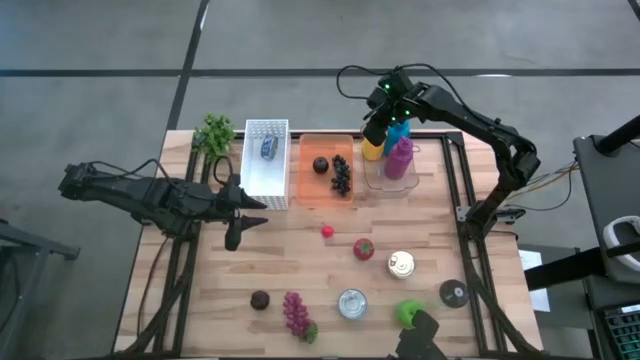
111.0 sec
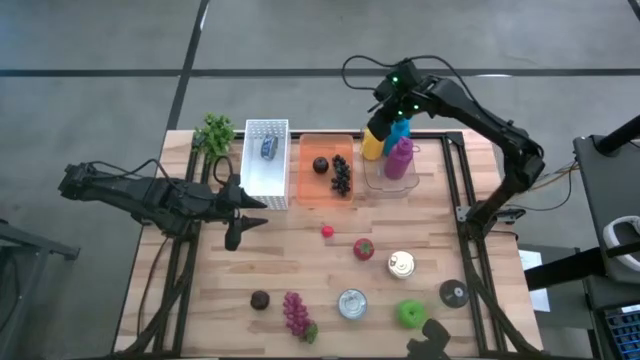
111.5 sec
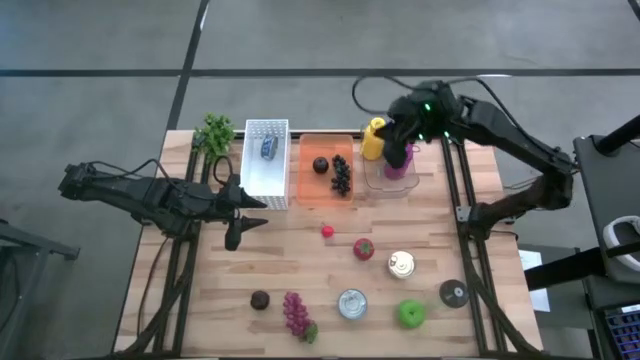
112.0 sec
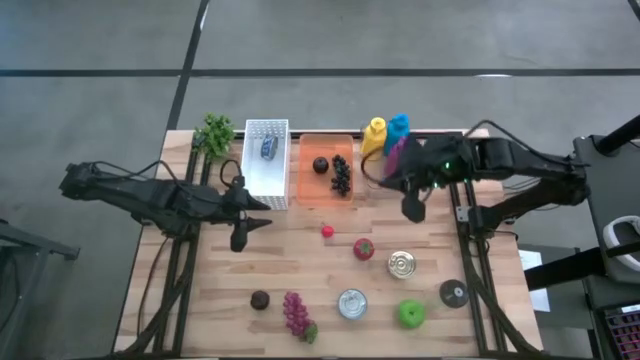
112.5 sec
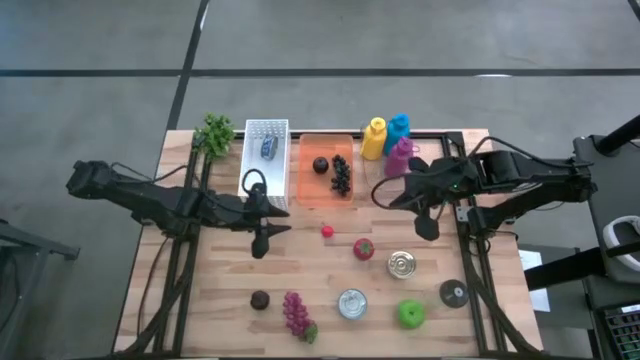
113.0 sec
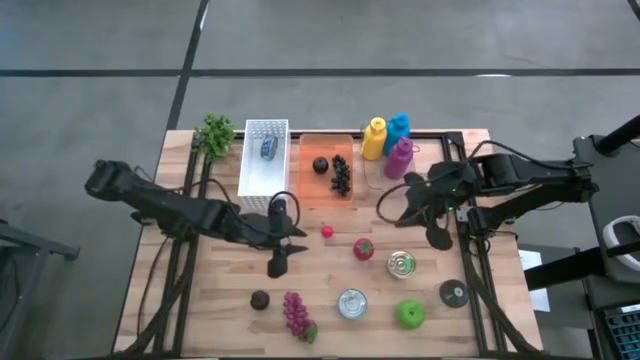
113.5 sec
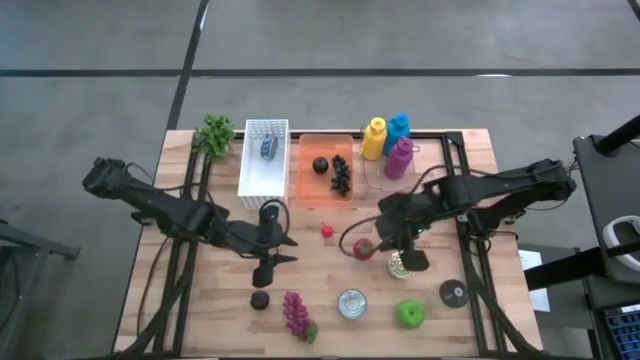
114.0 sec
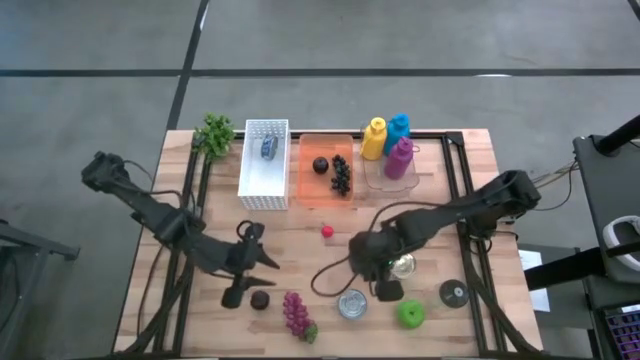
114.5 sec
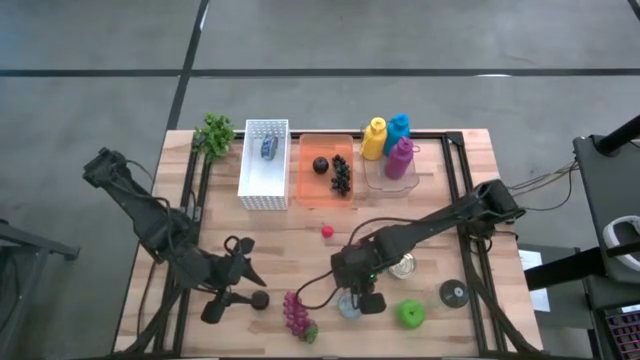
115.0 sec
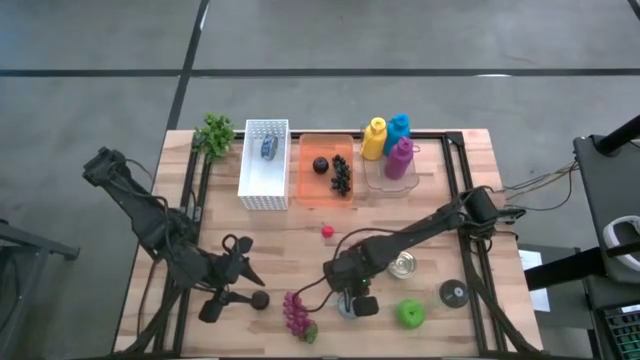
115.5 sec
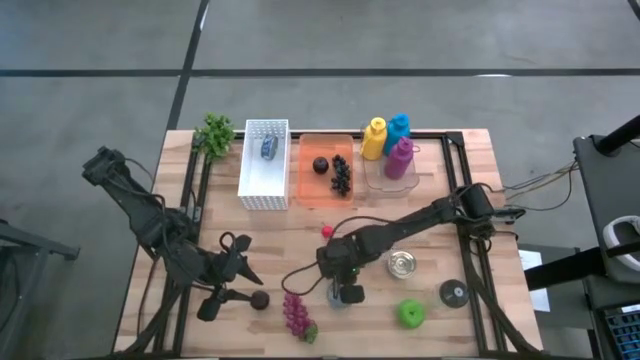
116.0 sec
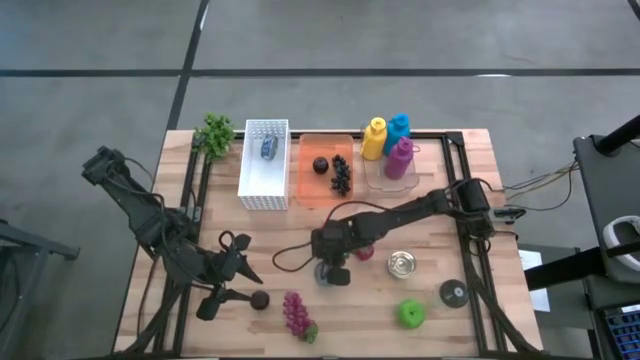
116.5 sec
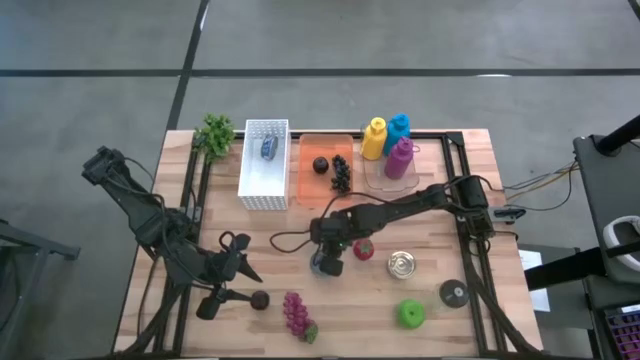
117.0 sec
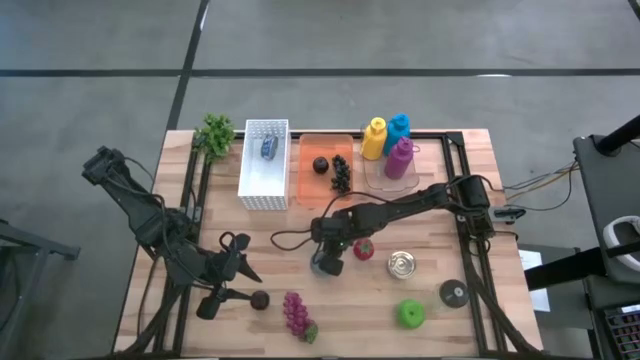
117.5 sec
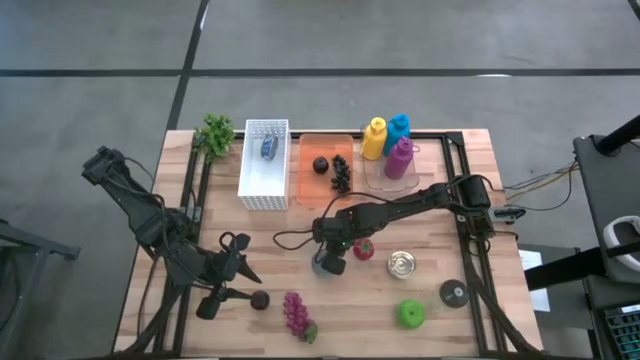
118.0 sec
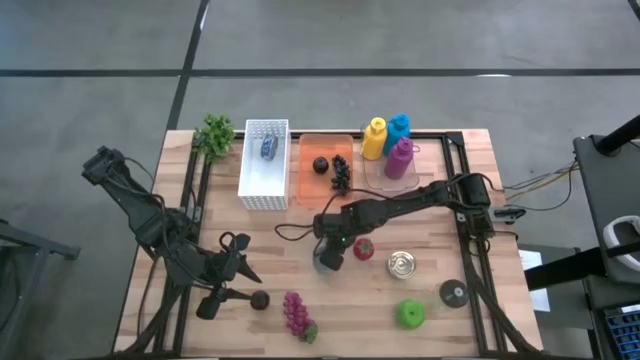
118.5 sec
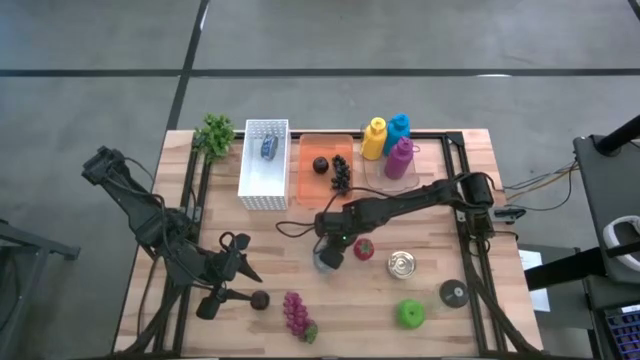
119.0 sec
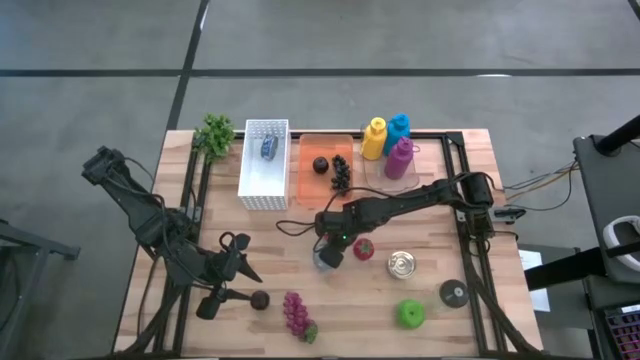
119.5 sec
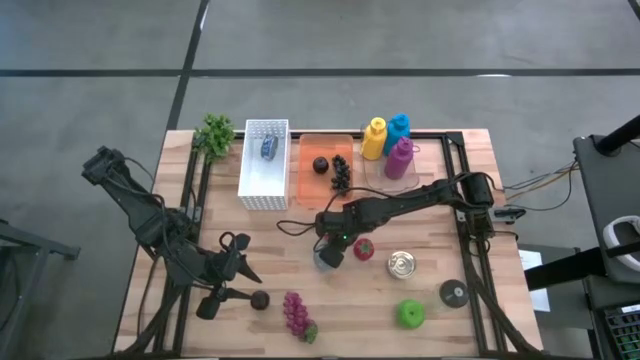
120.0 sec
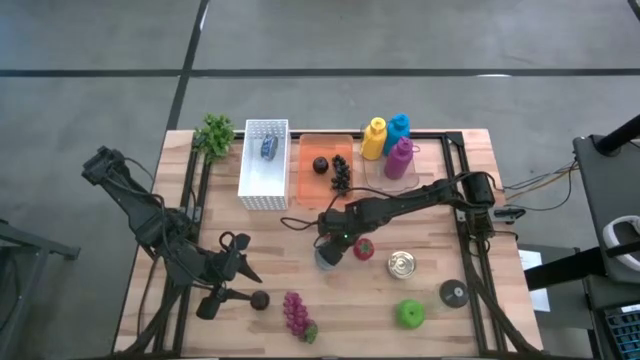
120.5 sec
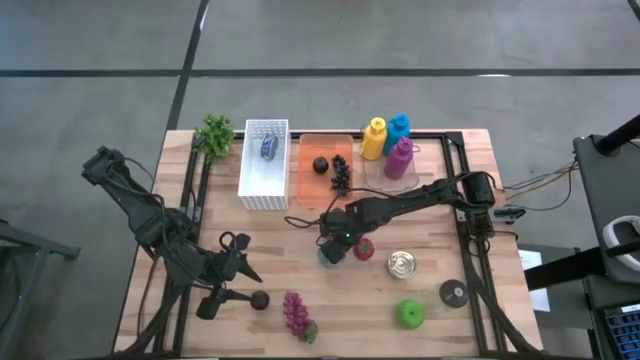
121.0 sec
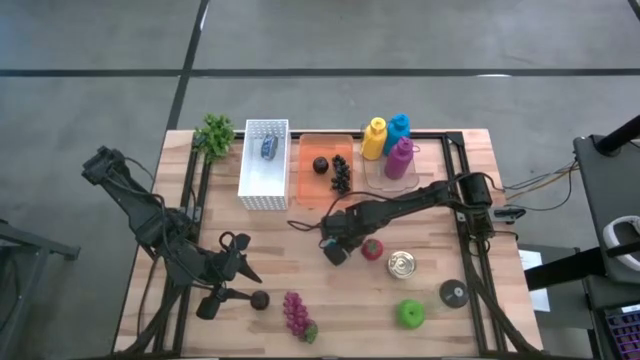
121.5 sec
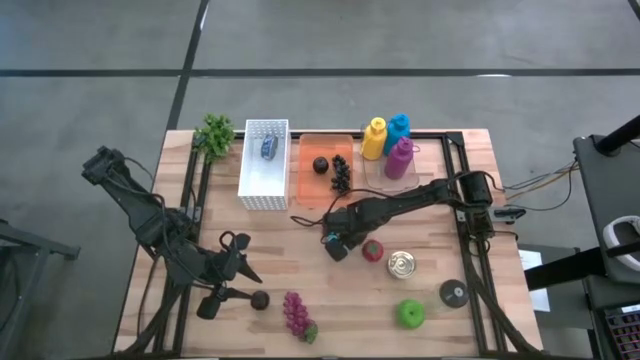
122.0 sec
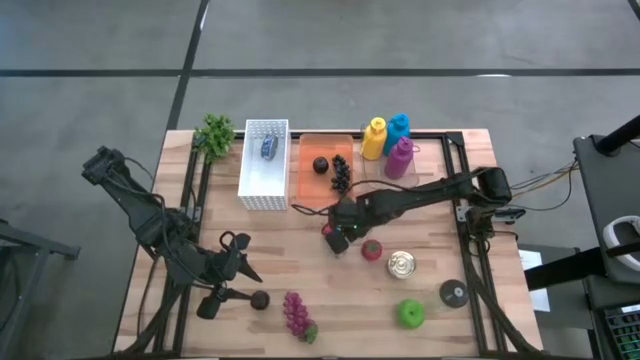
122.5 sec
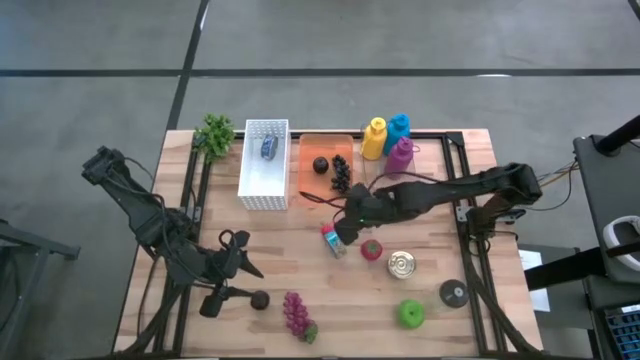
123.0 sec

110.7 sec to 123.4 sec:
Task: Pick & Place Food Item
Put the bottom blue tuna can into the white bin

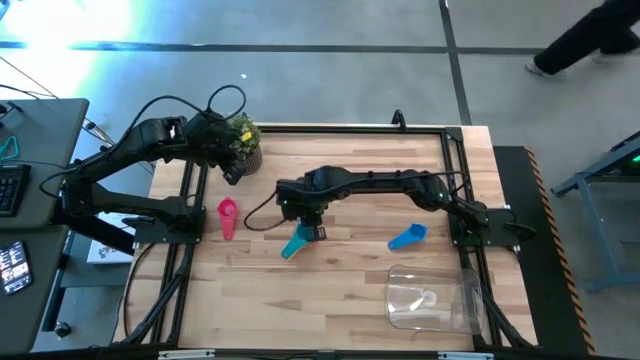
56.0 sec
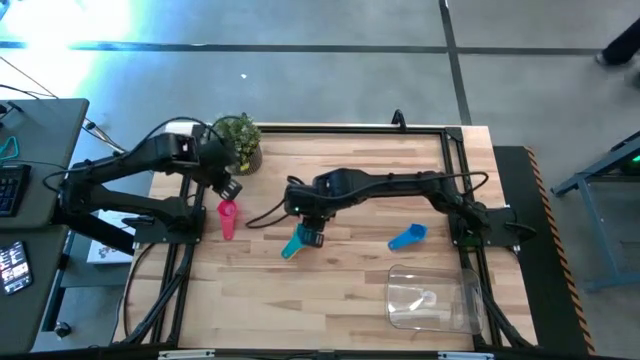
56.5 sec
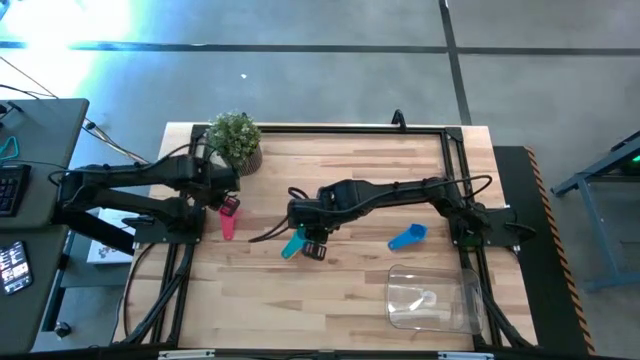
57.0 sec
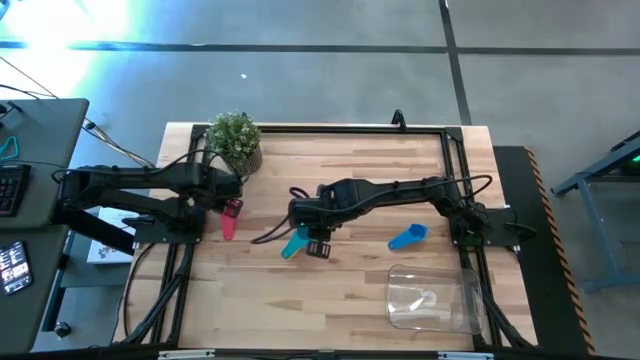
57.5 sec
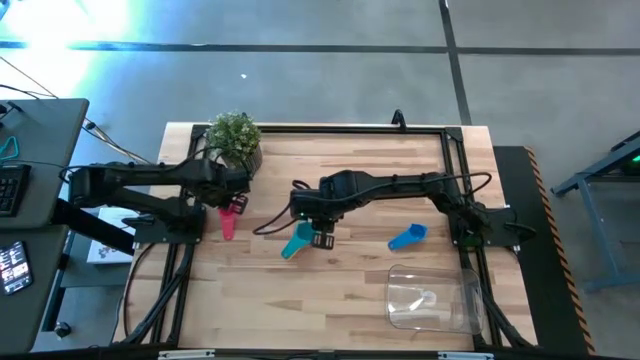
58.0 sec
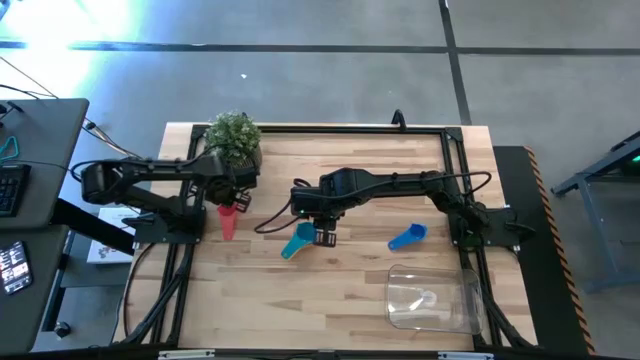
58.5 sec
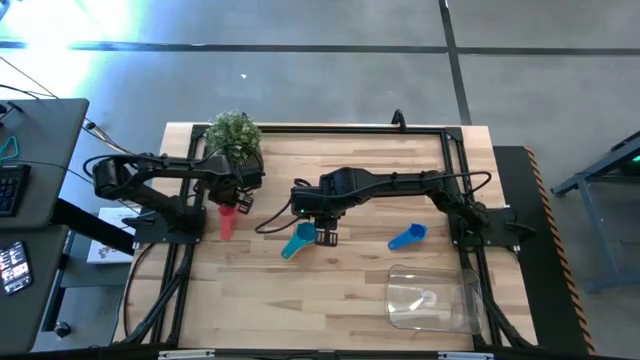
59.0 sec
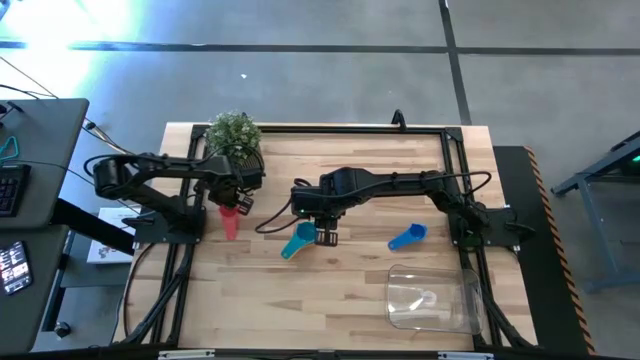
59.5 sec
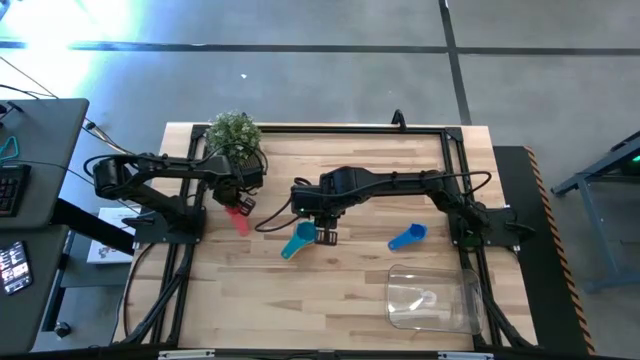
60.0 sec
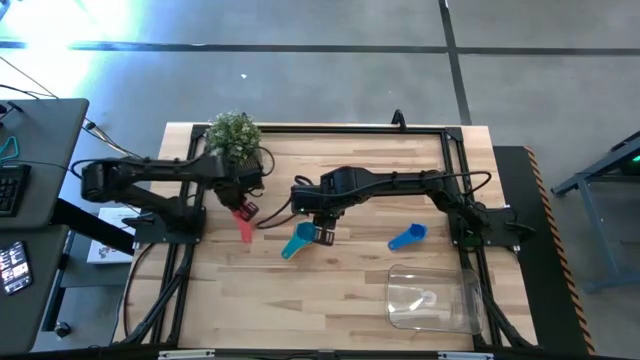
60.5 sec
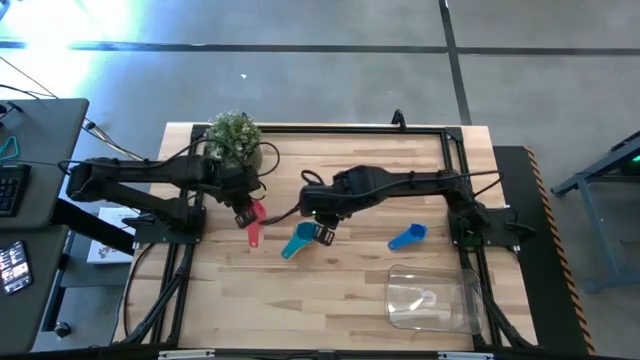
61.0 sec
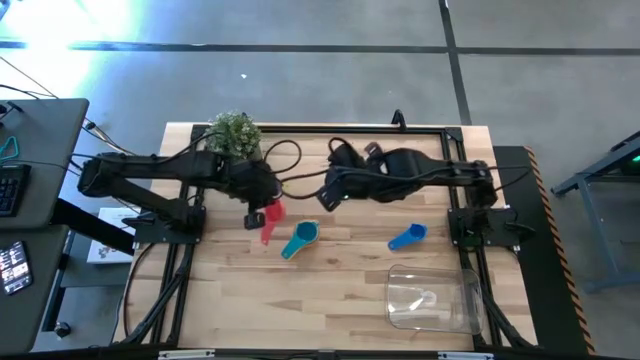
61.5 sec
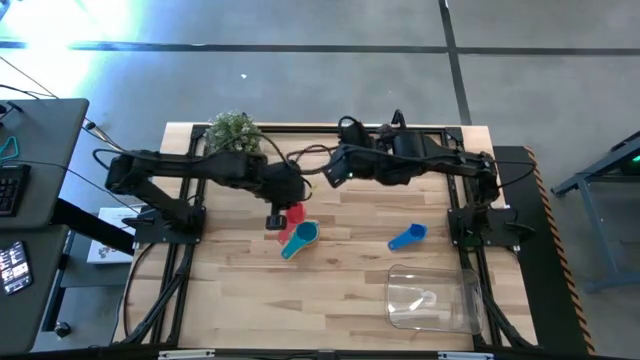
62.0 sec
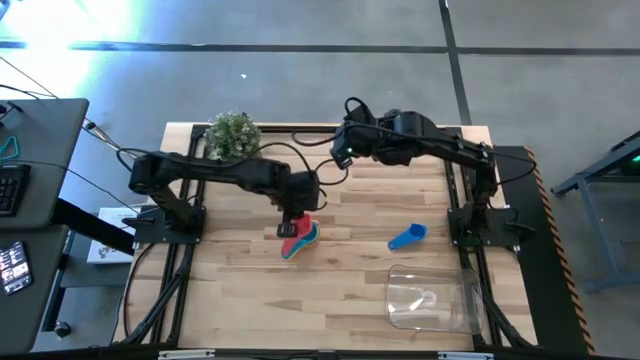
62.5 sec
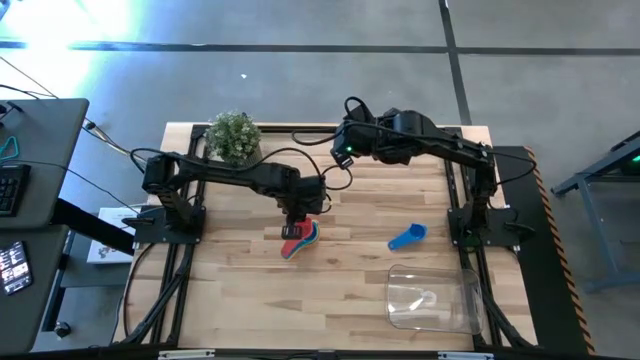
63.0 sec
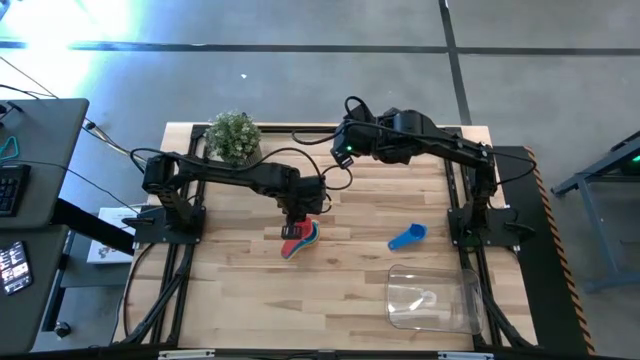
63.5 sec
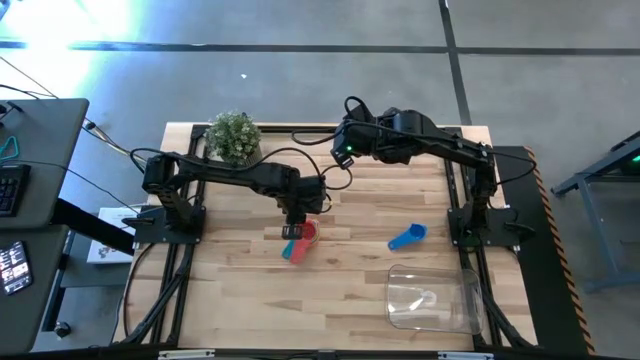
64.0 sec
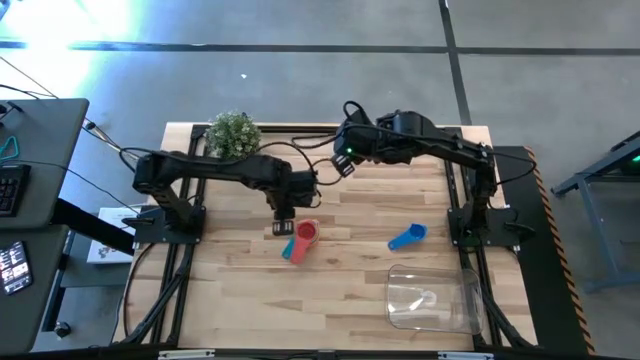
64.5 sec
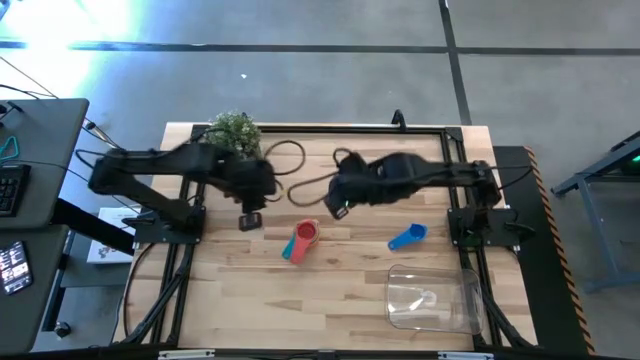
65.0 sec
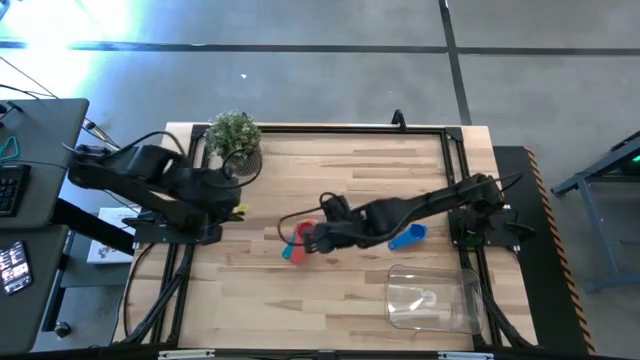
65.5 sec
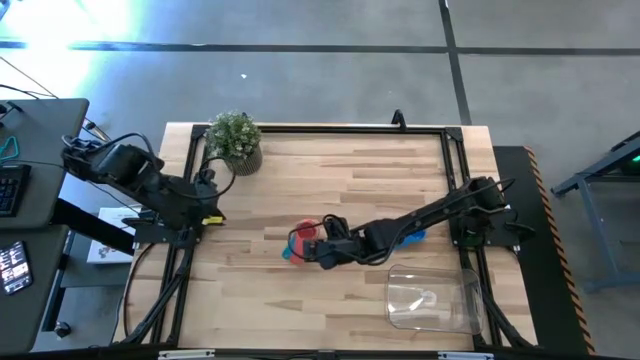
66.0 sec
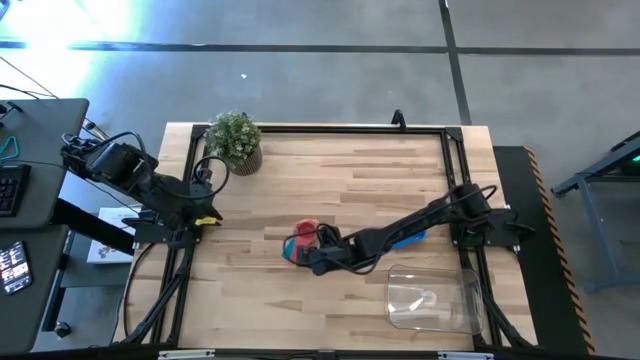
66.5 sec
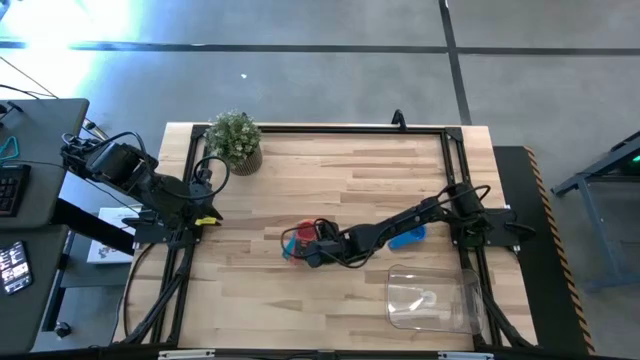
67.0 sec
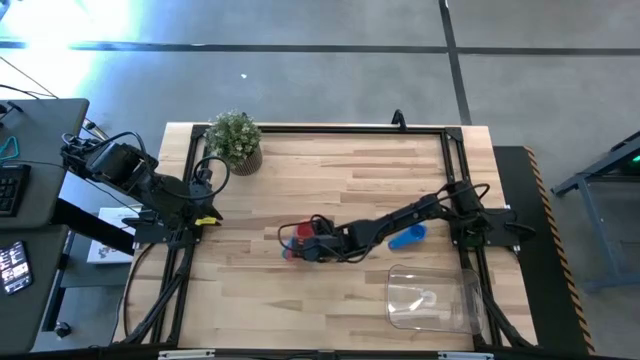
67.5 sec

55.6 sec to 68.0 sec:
Task: Nest measuring cups in basket
Stack the red measuring cup on top of the light blue measuring cup
